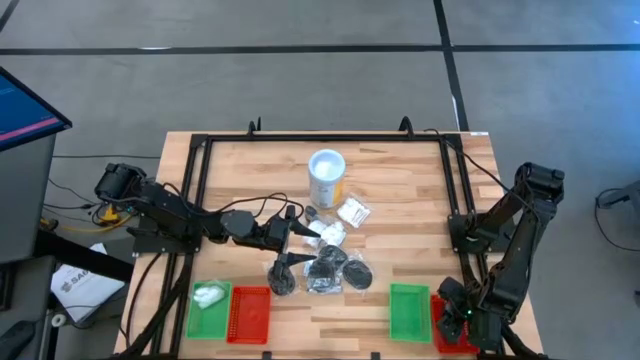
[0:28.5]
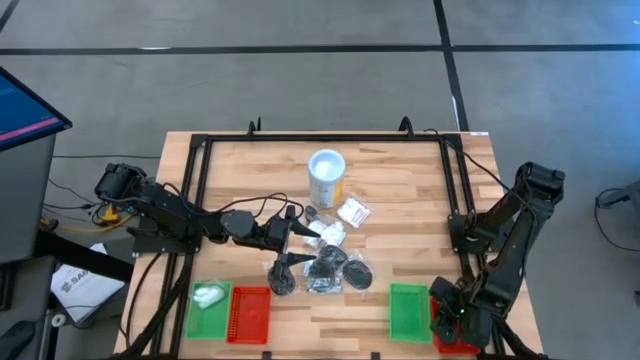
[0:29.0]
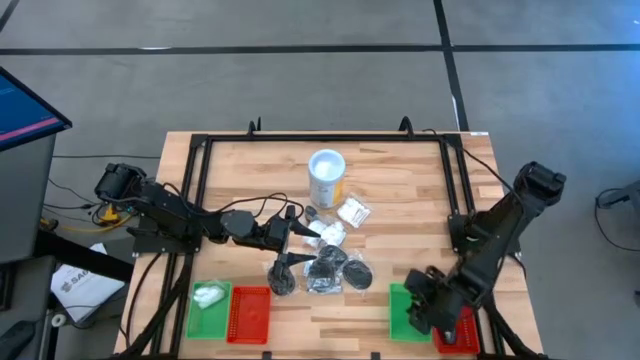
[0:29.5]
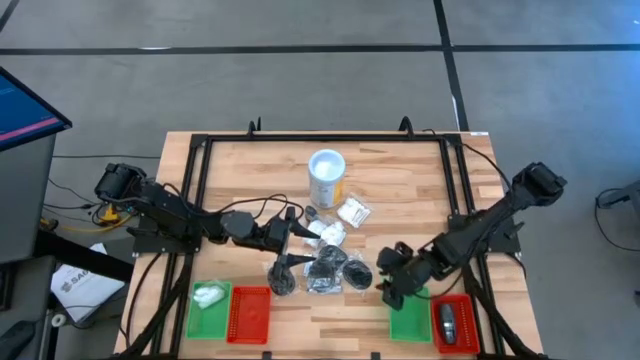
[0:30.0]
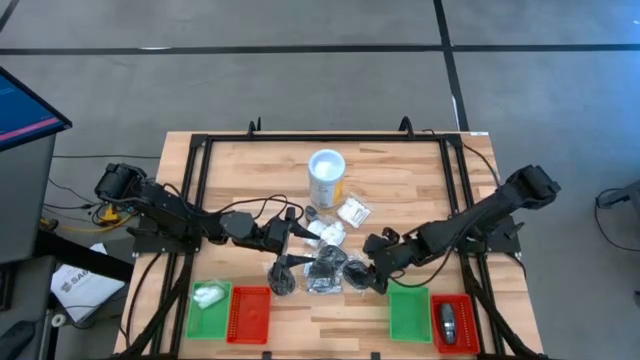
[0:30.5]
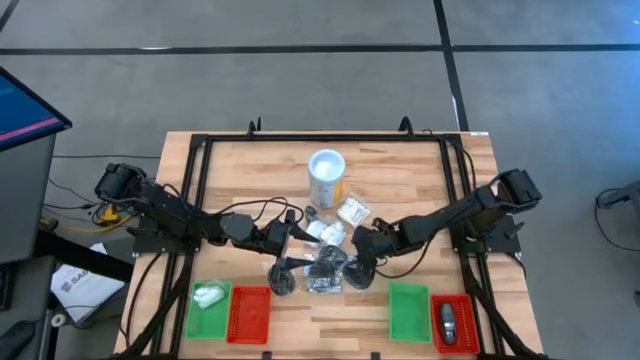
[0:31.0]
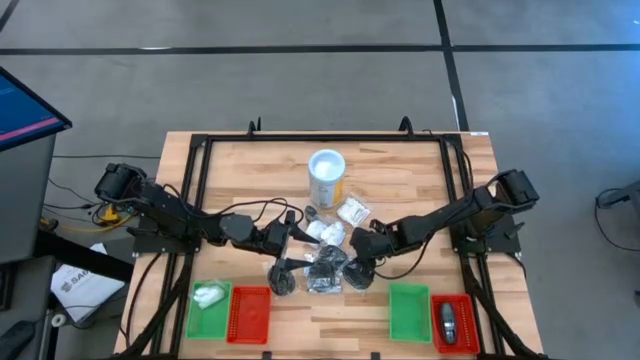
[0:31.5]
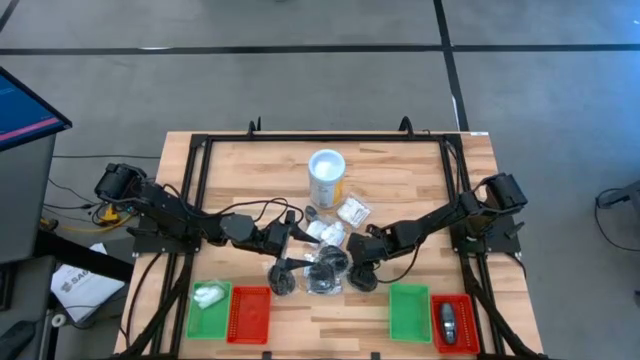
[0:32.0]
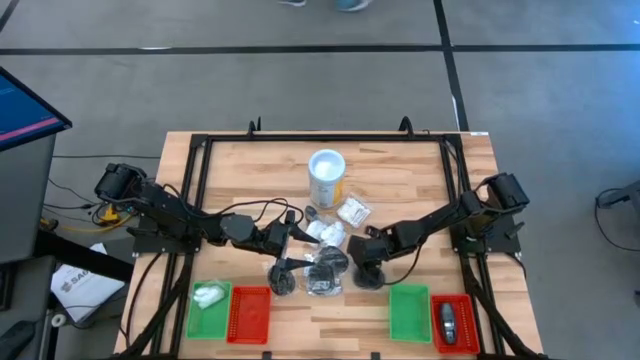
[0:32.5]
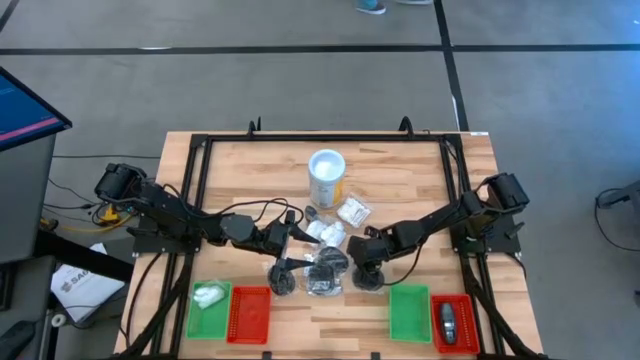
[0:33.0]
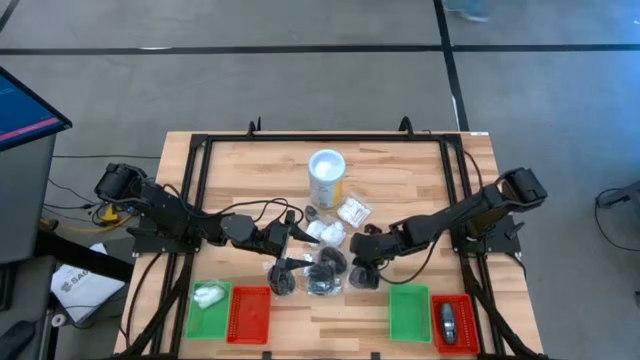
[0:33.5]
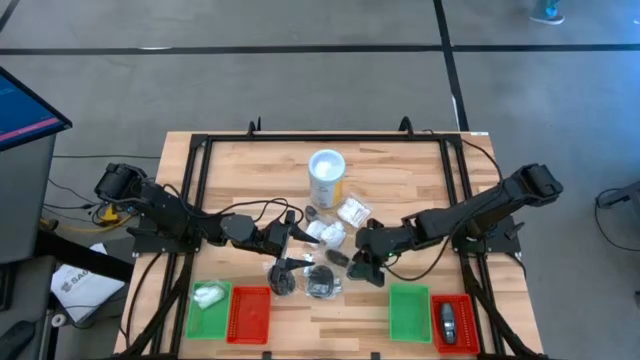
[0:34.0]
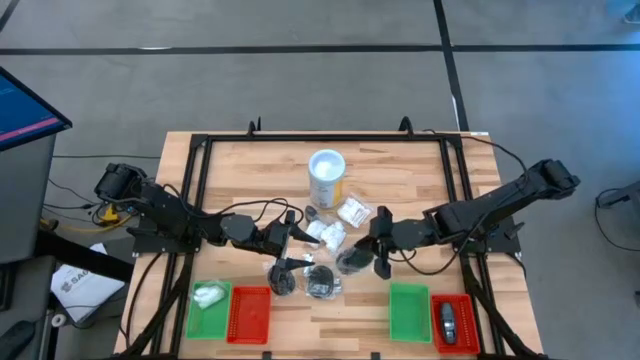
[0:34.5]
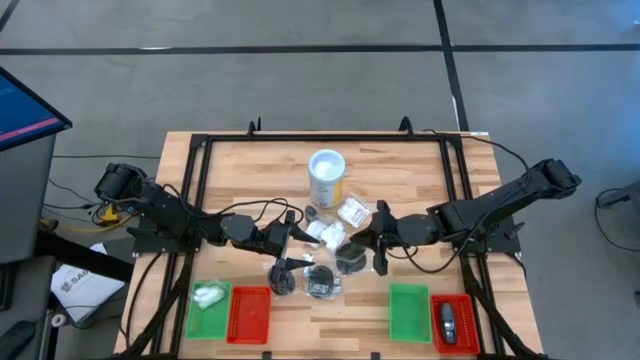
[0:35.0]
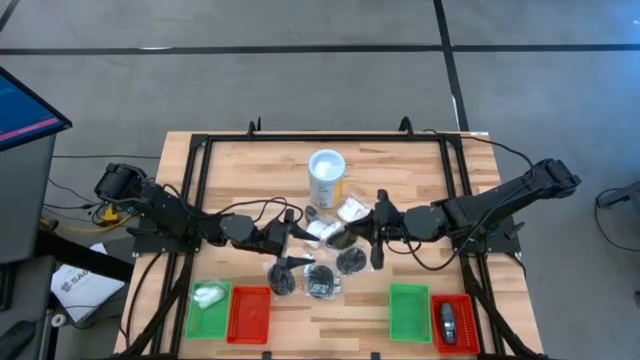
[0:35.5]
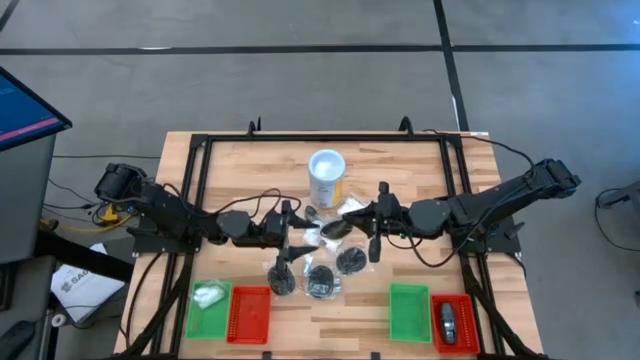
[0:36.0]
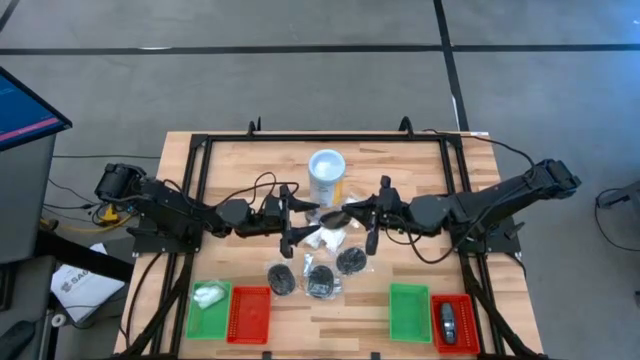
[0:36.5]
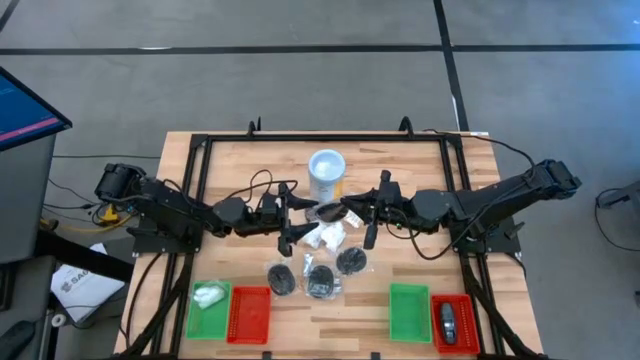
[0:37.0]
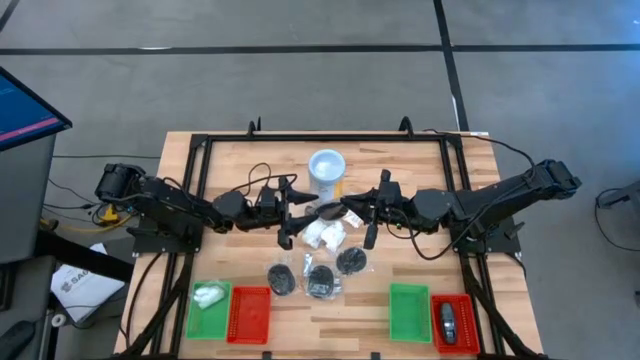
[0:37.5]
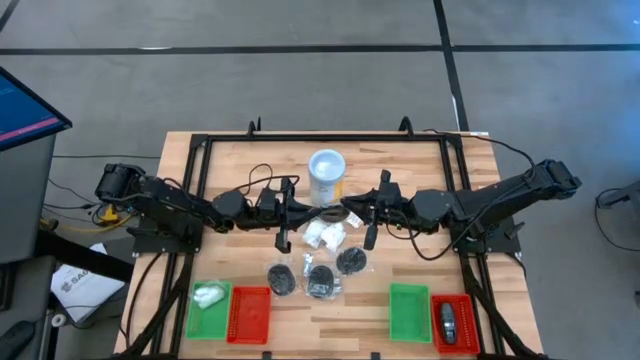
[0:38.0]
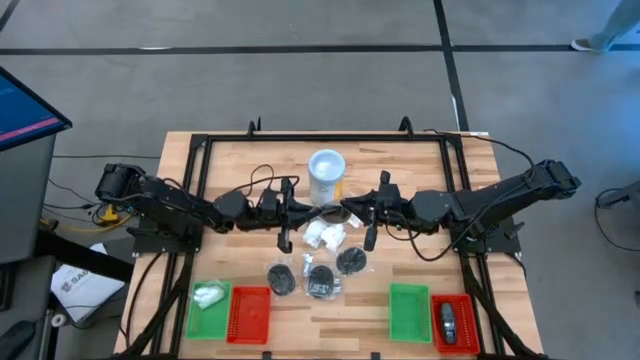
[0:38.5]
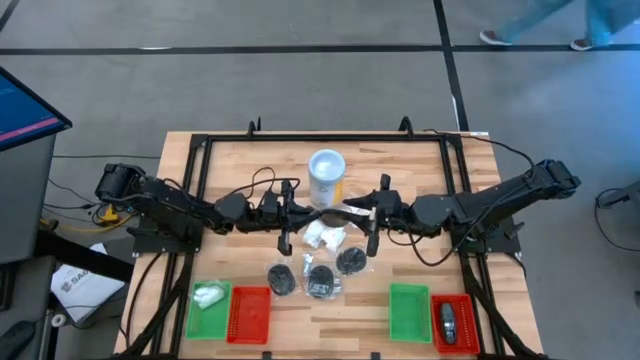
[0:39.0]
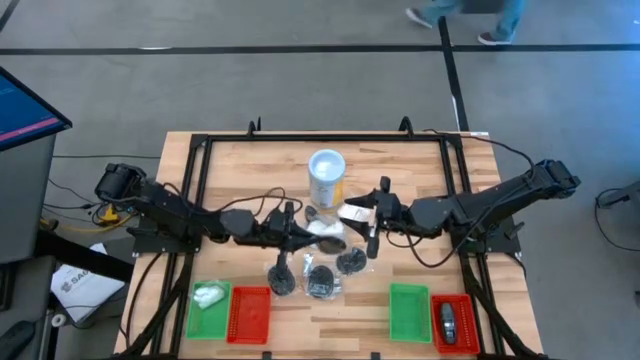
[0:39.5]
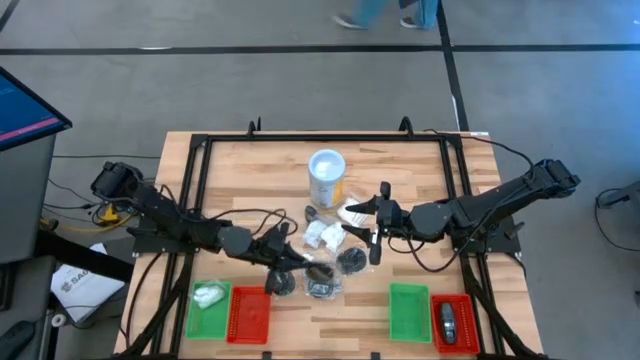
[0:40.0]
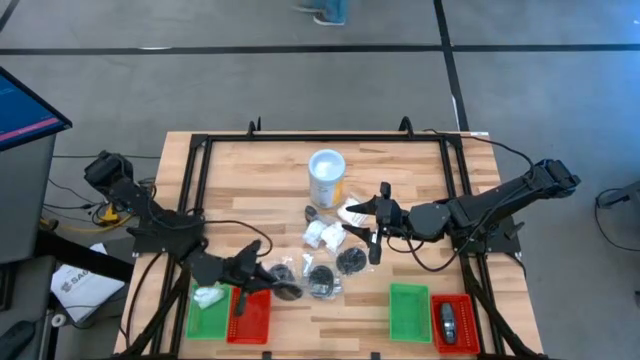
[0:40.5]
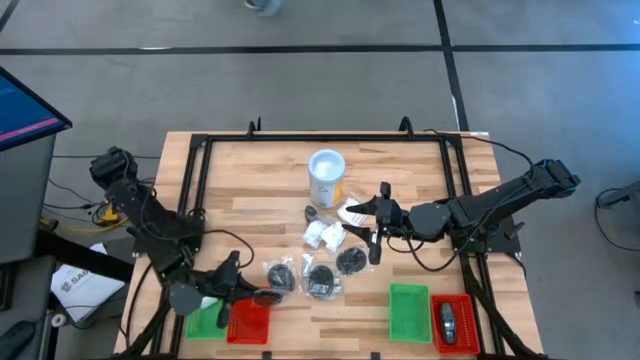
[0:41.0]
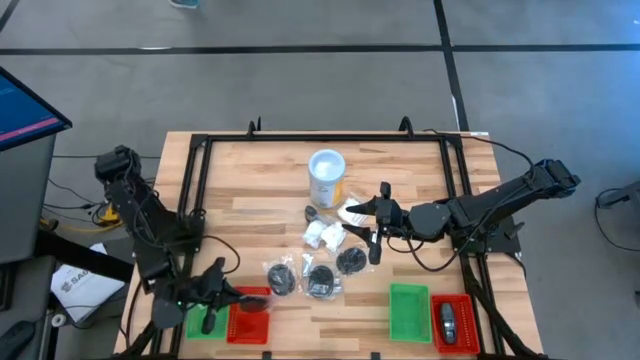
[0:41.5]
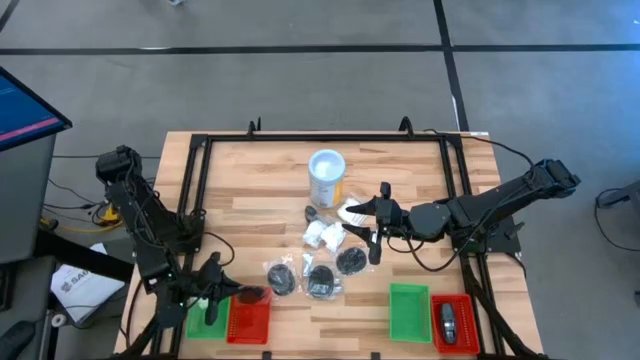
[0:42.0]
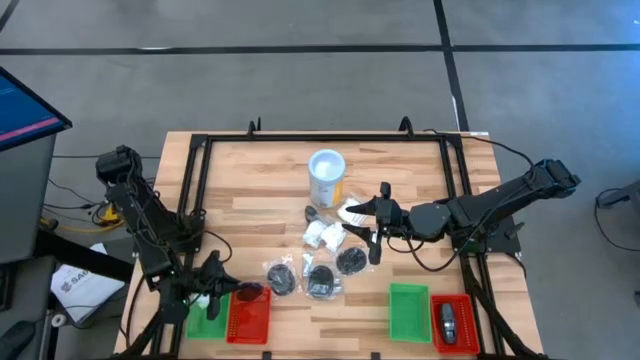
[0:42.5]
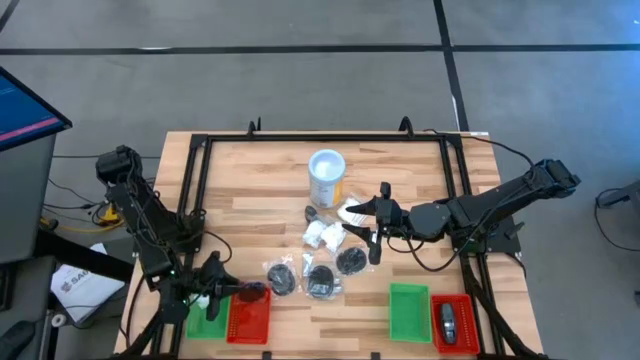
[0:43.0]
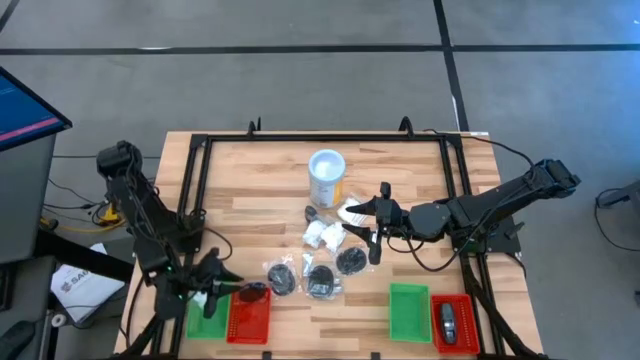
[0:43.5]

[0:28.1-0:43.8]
Task: Pick & Place Travel size toiletries
Put the hairbrush into the left red bin

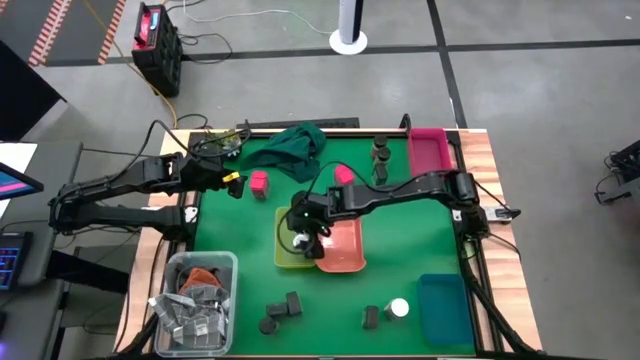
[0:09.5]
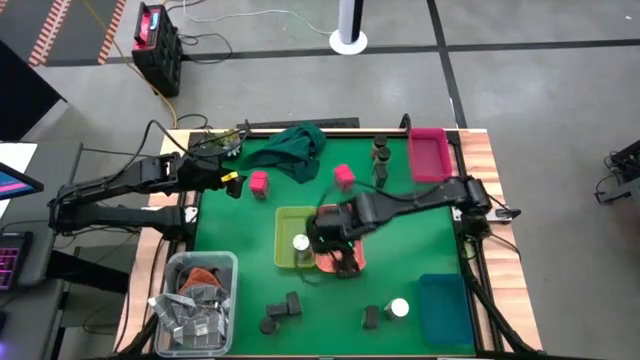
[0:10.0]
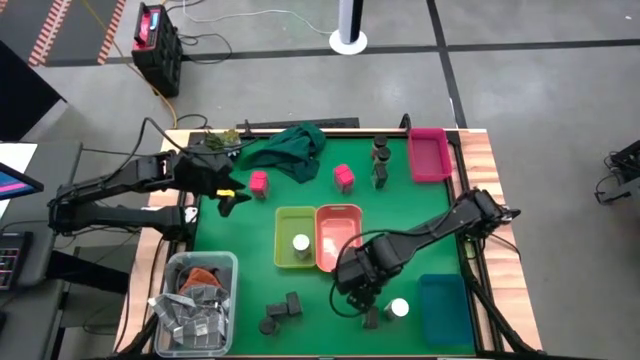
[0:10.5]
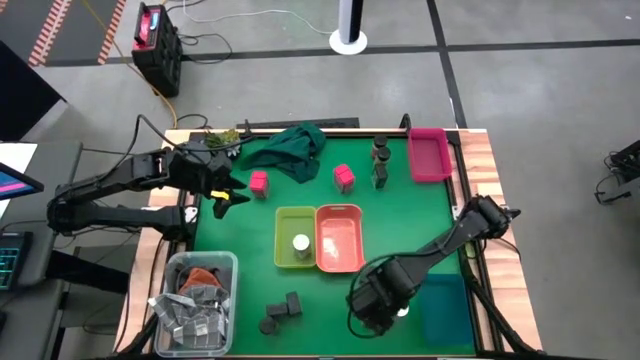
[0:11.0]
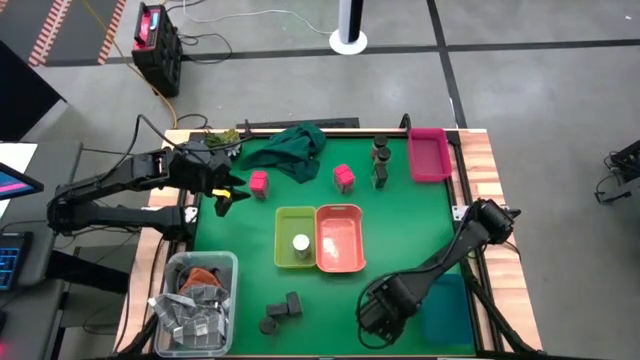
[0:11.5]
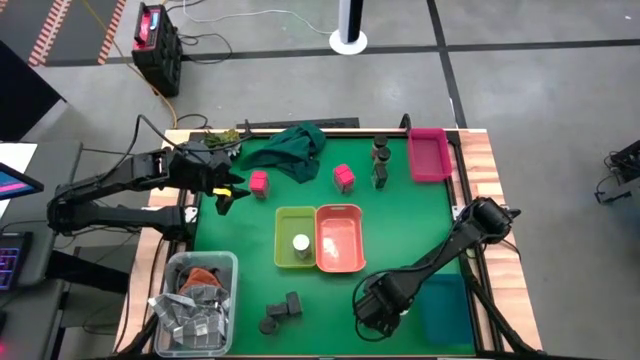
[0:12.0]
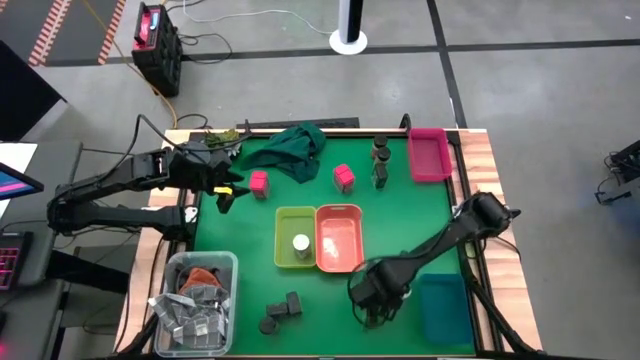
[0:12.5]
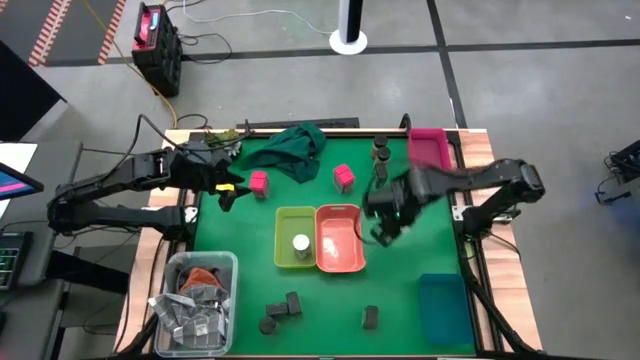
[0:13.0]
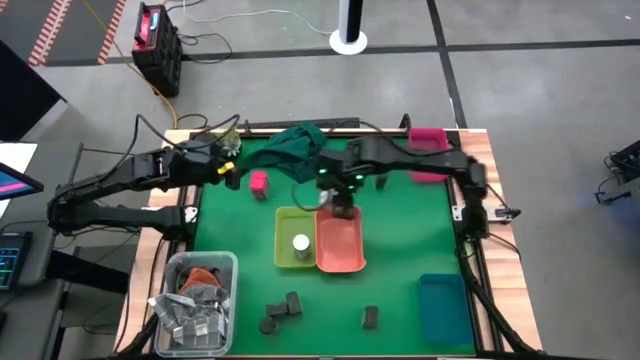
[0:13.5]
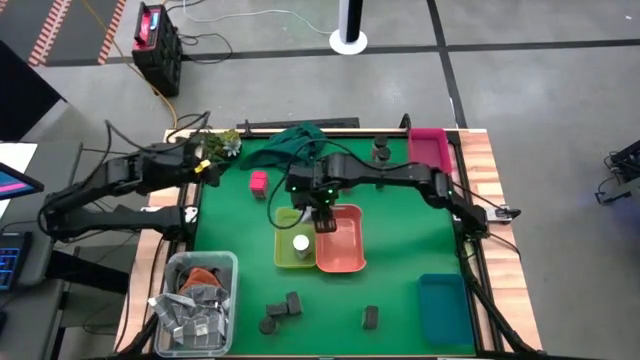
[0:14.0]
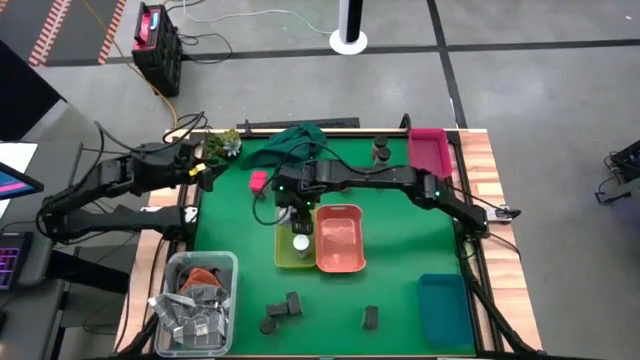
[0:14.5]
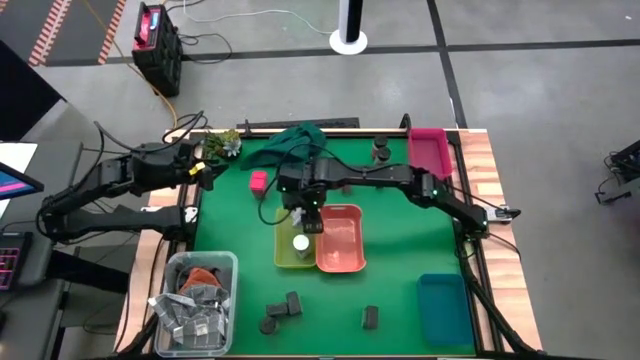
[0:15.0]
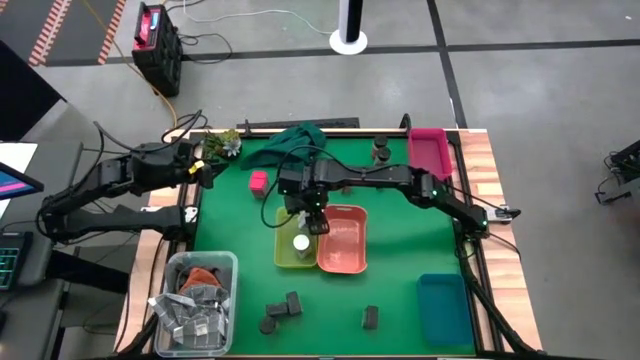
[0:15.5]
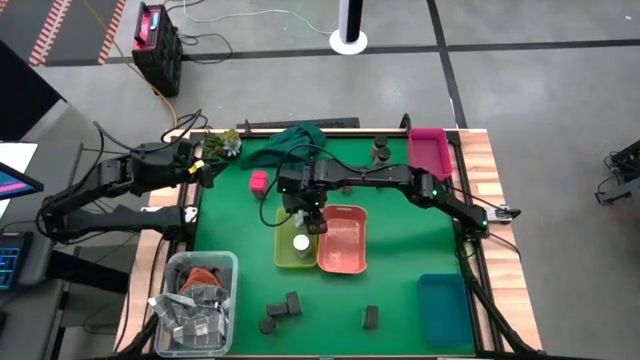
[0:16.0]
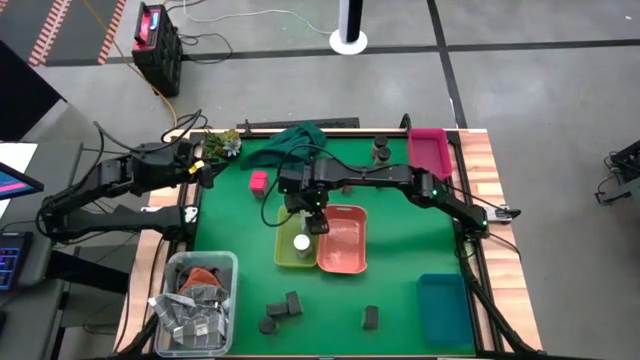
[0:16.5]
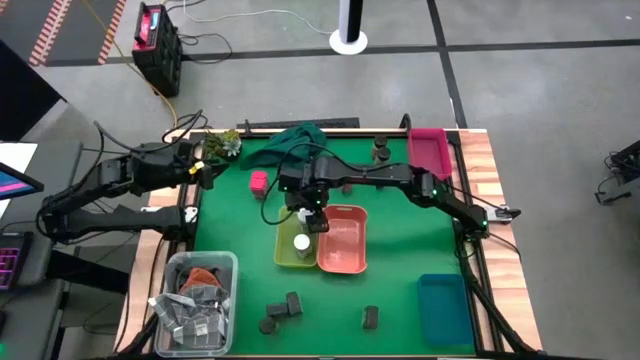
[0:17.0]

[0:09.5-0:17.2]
Task: Sort spices by type
Put the white seasoning bottle into the green bin
